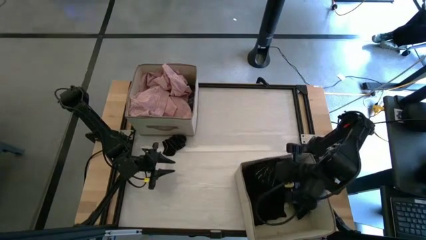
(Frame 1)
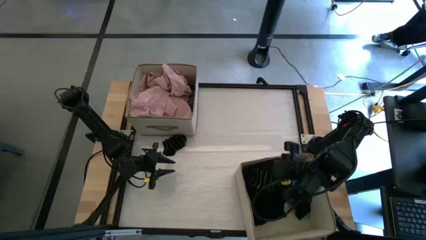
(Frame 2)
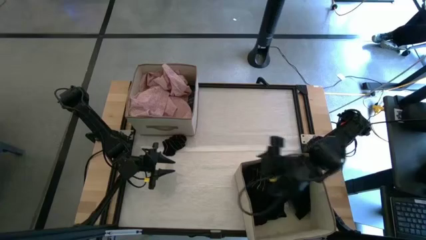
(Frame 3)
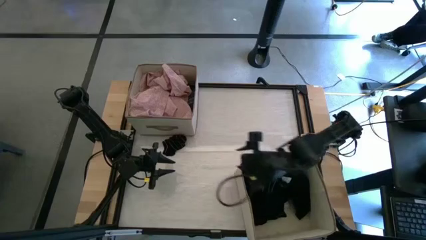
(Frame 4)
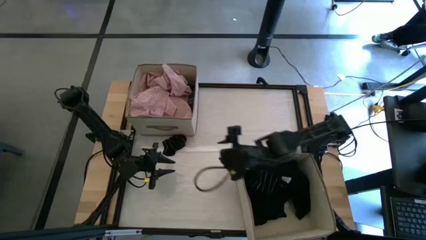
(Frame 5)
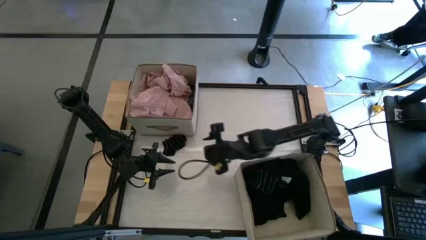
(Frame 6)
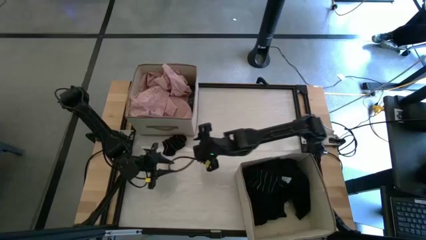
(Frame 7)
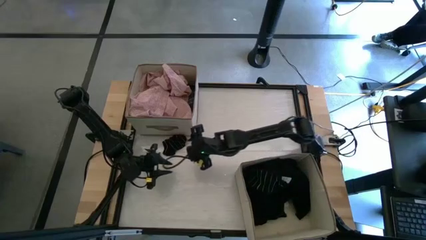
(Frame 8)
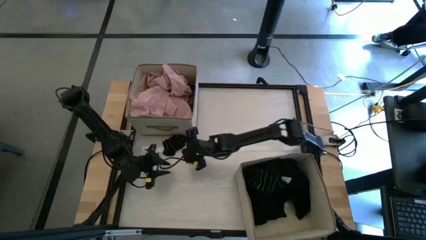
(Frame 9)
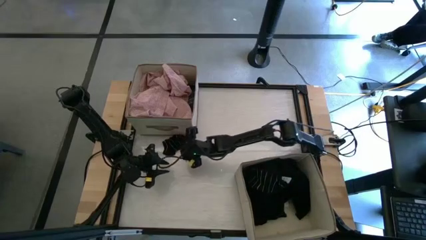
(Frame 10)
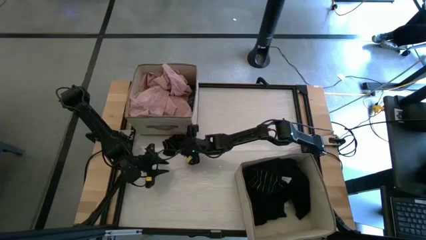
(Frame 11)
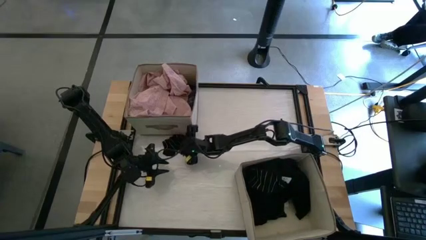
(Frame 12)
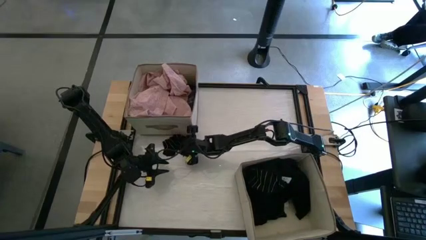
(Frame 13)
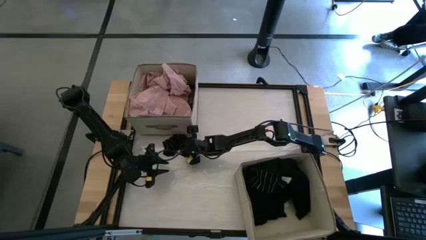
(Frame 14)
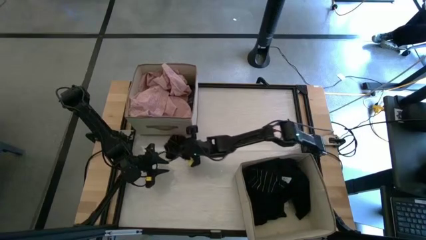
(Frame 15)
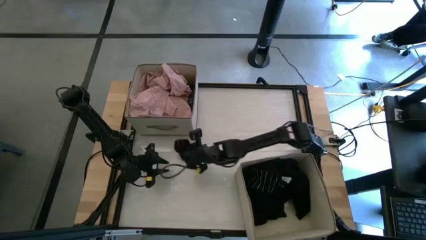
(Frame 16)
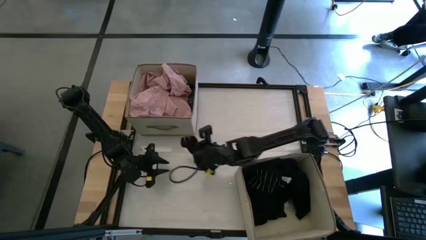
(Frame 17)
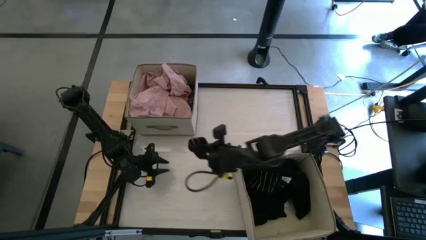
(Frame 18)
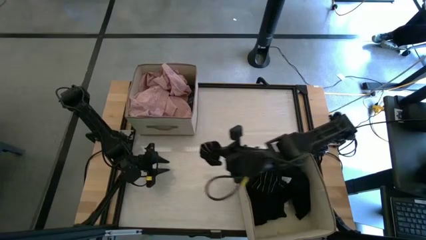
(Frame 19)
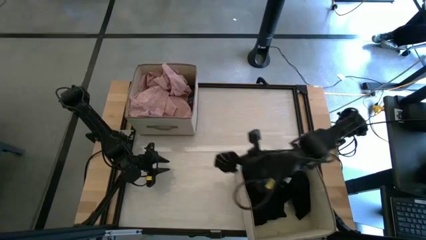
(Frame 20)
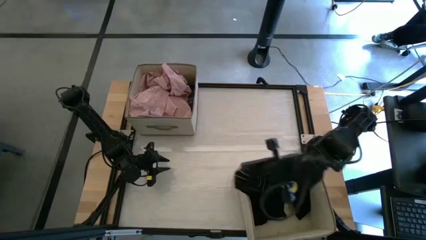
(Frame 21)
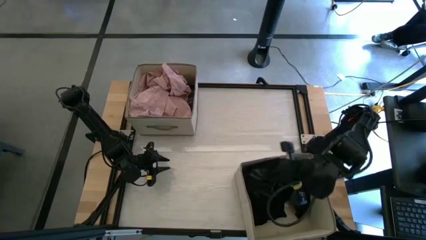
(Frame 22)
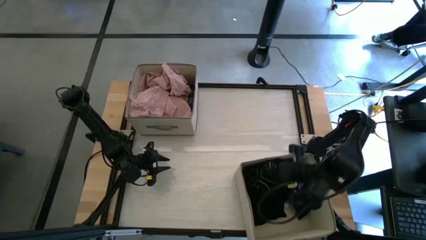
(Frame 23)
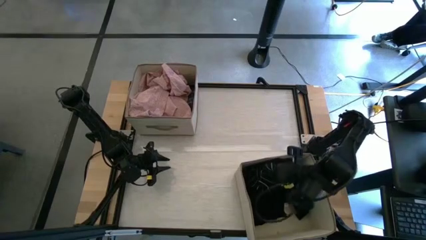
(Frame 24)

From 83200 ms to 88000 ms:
Task: Sort clothes
Put the black sock into the bottom white laundry organizer

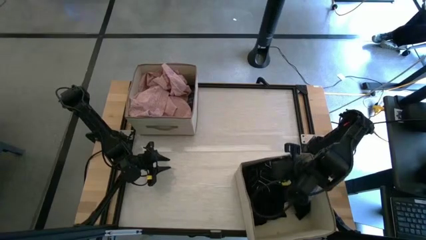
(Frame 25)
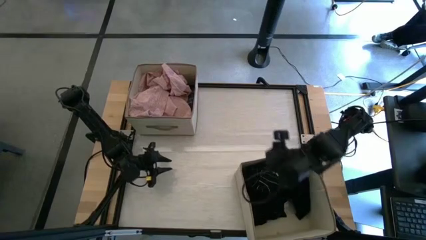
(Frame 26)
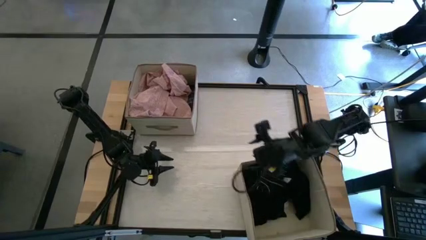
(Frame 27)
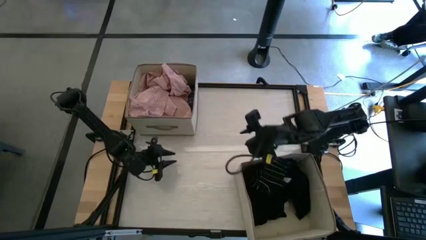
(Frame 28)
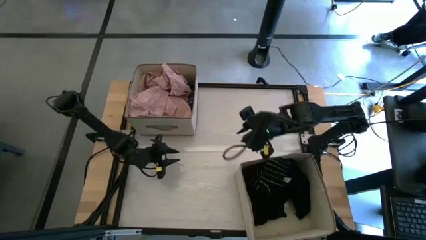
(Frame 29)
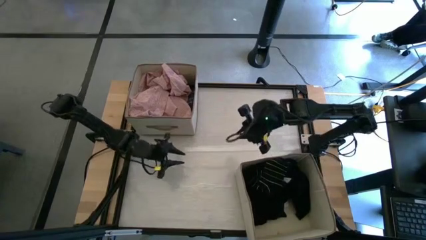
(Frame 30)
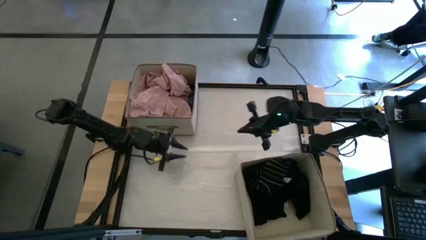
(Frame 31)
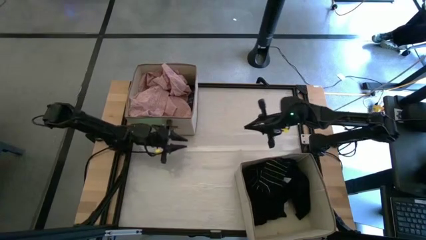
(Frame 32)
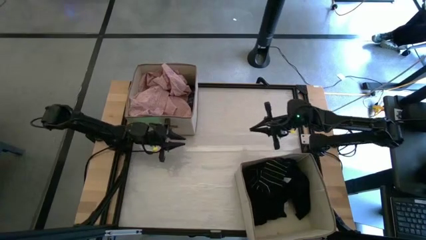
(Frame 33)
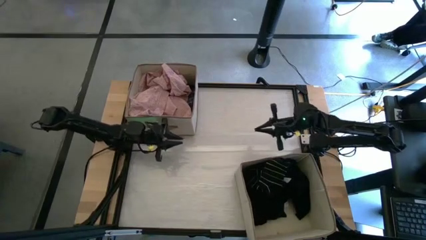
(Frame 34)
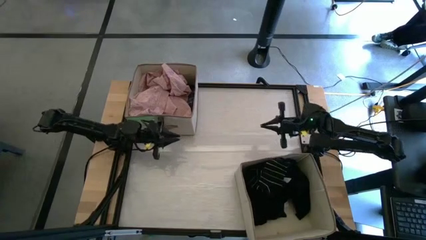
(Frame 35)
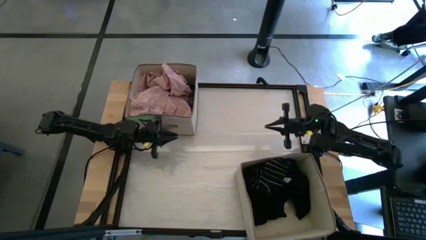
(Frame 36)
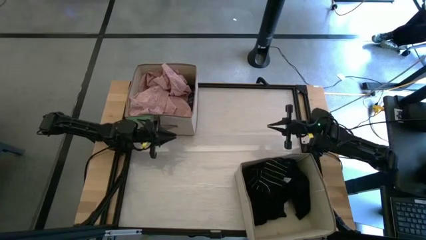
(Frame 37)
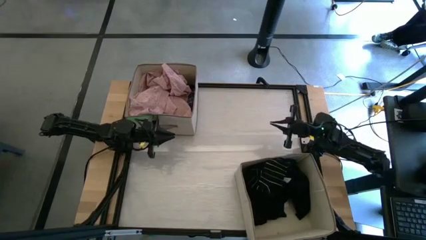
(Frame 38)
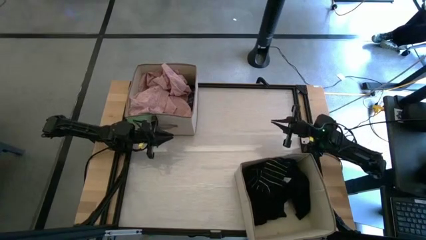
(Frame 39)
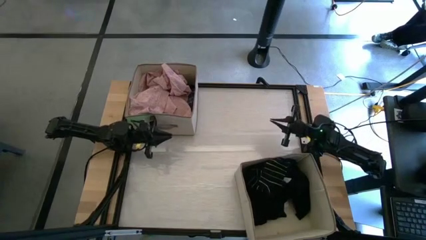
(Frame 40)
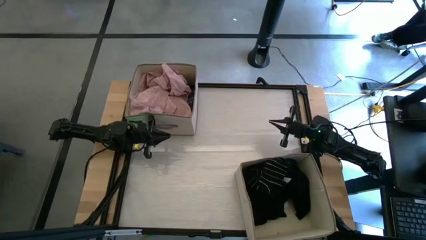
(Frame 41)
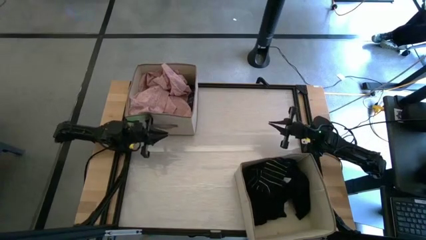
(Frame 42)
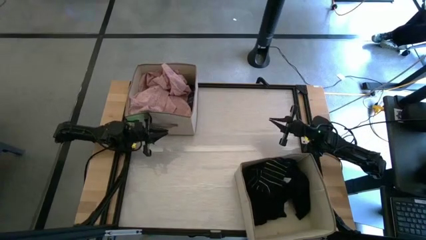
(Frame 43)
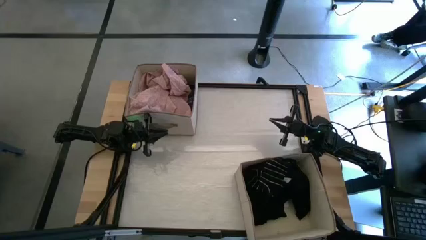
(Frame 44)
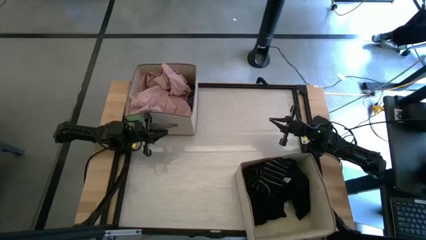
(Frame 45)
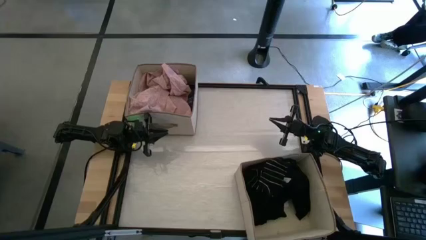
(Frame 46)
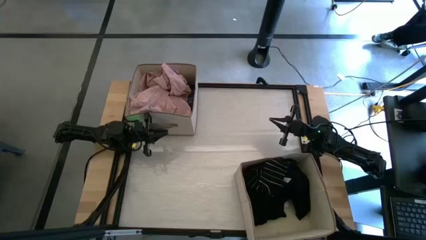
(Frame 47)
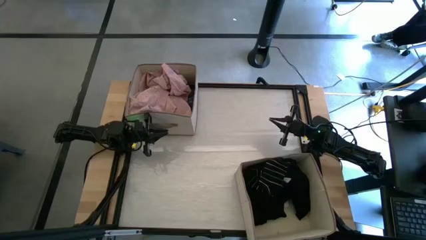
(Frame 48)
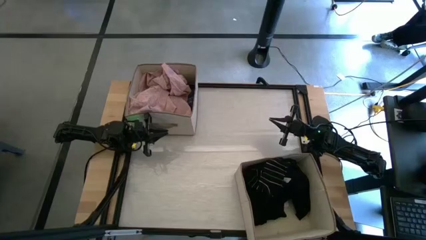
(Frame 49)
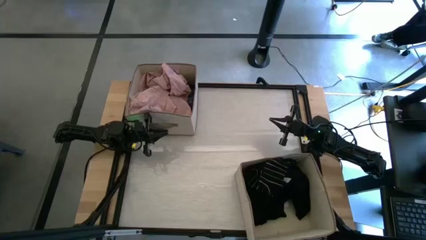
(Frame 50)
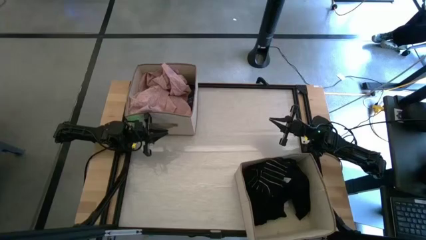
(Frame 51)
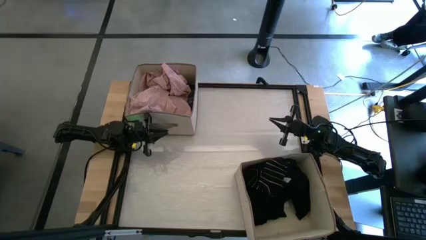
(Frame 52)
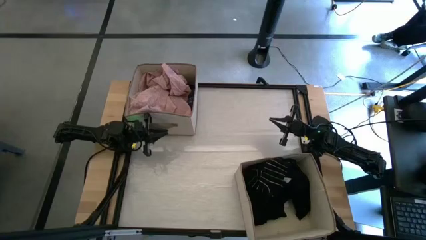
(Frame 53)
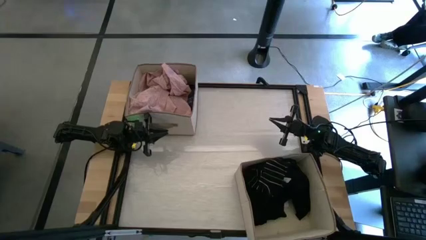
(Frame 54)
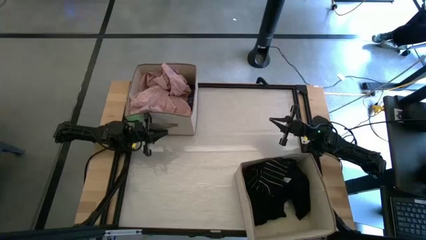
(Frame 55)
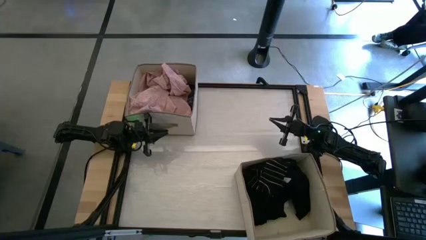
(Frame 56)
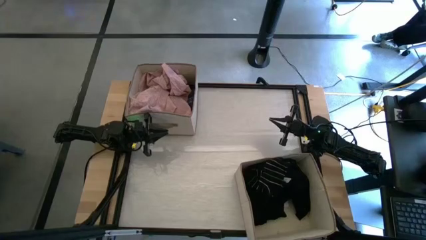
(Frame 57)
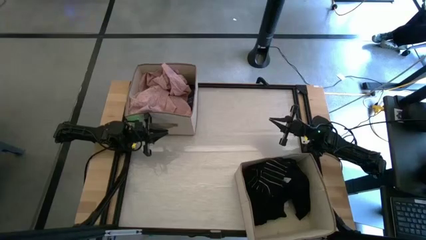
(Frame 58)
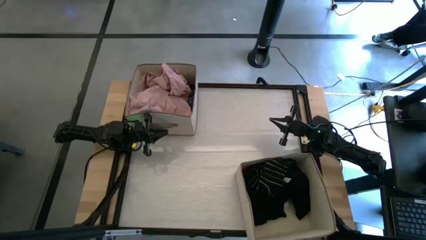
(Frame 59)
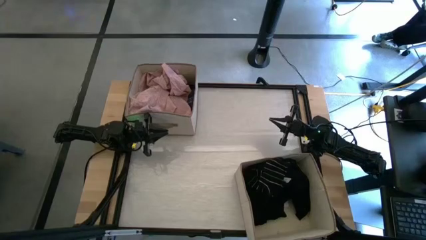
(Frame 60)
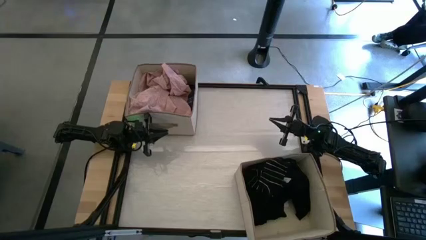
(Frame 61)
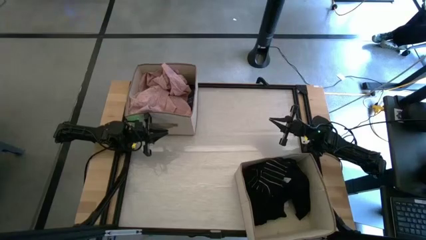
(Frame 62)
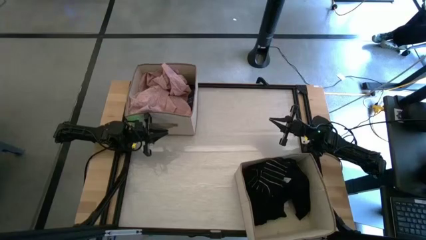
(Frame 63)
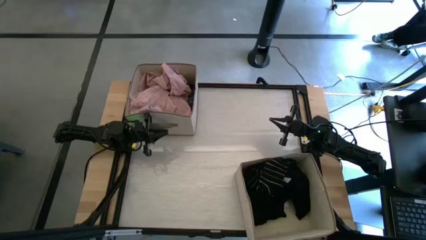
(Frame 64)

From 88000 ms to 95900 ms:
Return to Home Position

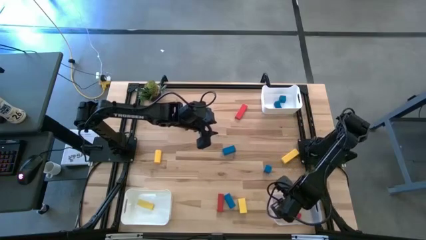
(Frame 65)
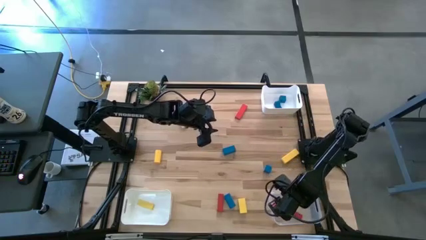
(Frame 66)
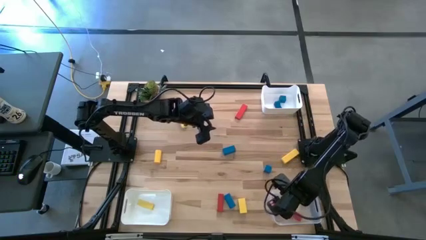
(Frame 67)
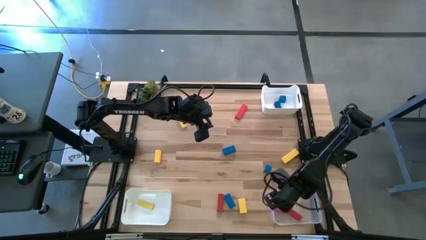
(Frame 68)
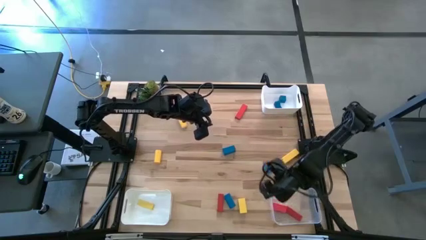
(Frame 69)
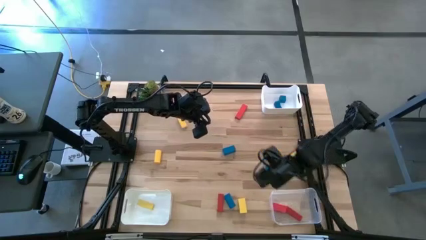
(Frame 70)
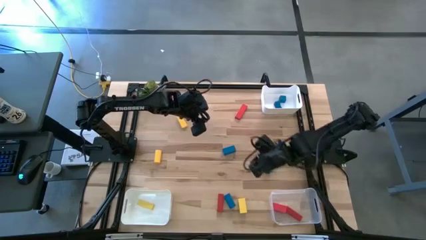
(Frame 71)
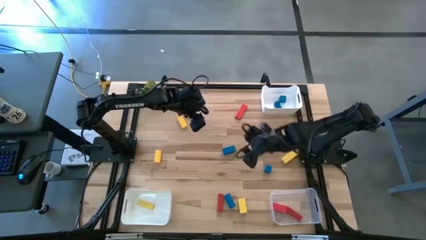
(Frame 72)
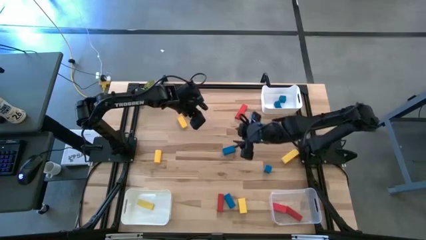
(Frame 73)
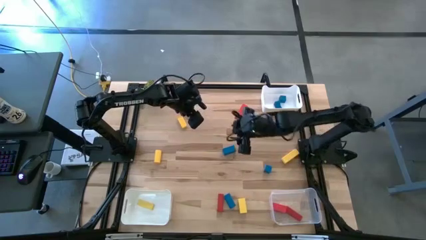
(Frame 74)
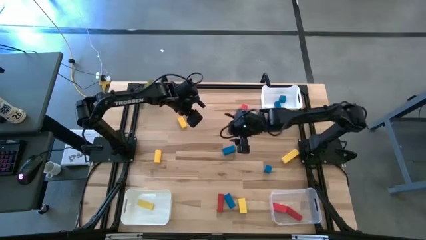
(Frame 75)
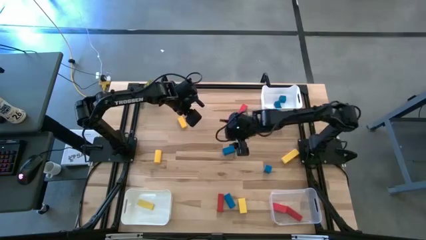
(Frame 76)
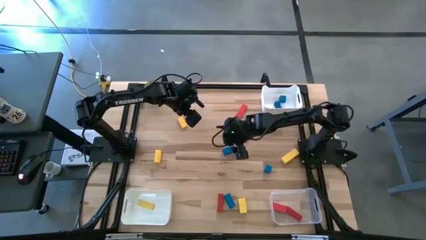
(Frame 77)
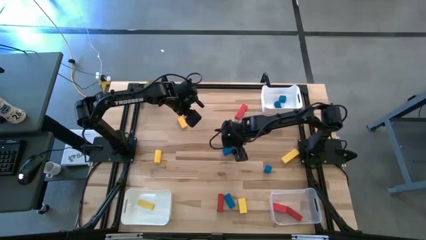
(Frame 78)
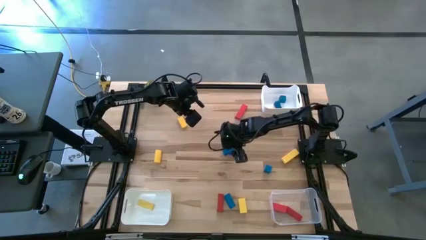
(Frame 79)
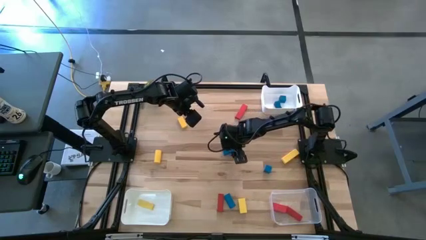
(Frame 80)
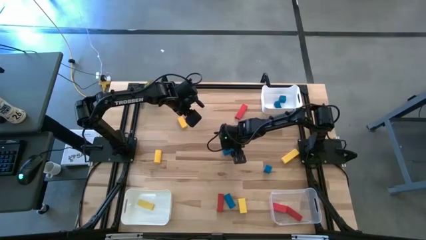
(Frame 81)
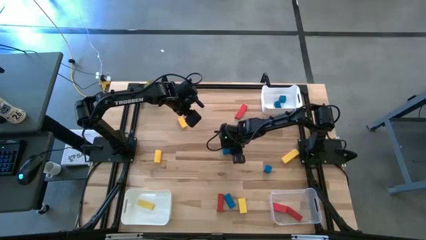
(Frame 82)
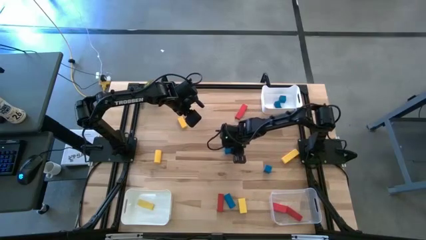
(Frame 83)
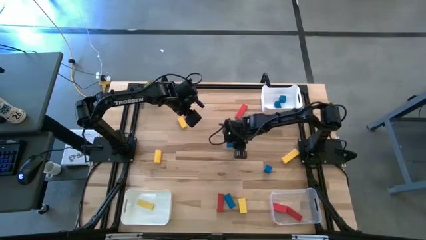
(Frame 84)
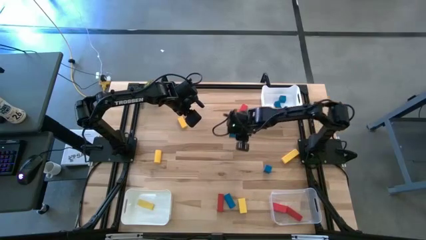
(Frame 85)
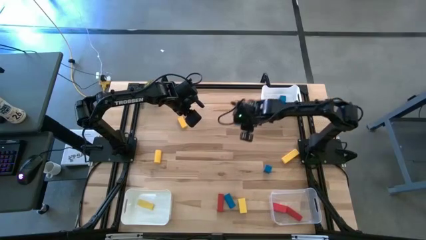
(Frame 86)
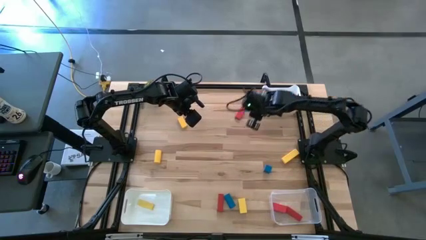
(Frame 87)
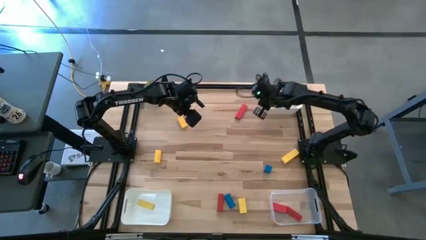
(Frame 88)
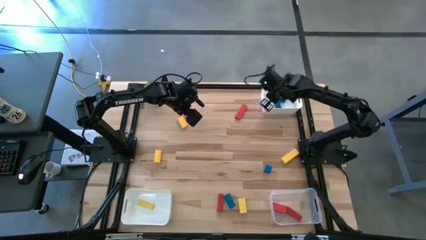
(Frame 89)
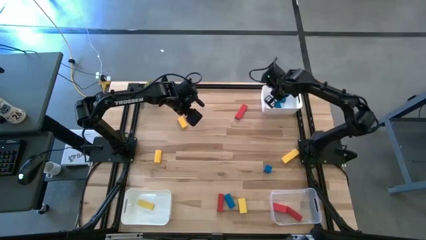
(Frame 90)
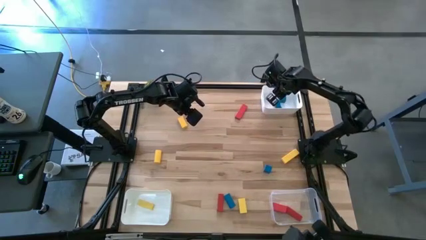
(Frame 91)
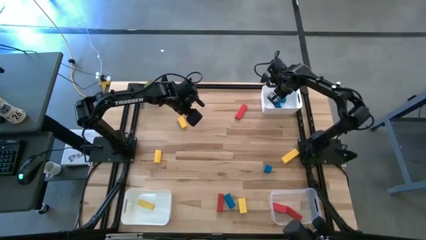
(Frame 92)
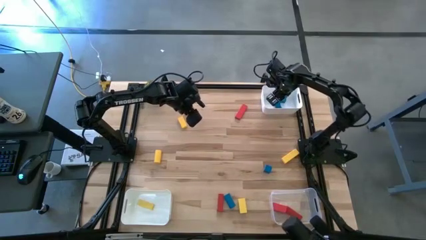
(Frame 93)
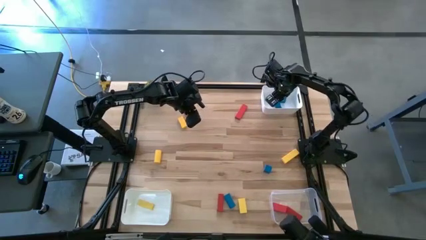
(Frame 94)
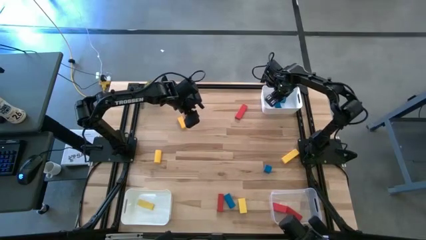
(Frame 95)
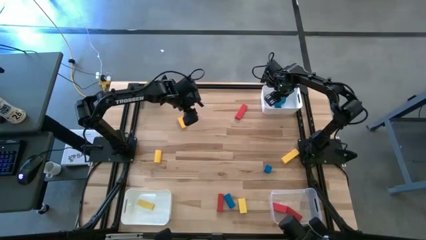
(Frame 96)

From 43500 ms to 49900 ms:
Task: Sort & place blocks by color
Put the blue block into the top white bin
